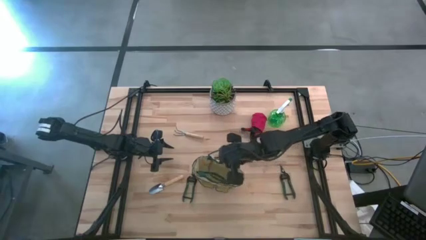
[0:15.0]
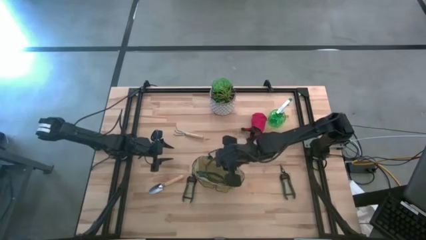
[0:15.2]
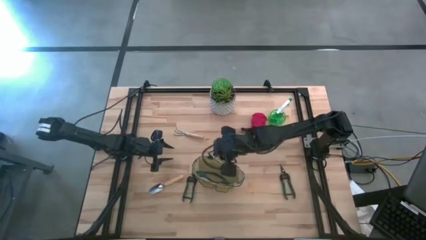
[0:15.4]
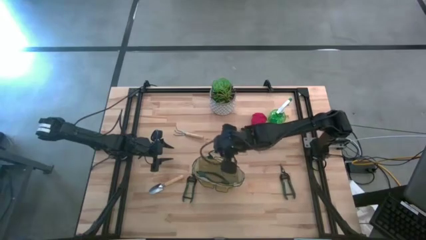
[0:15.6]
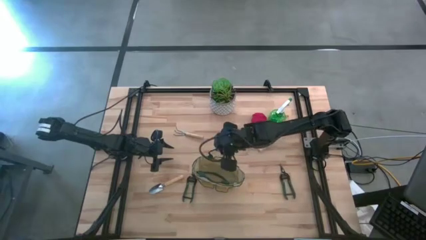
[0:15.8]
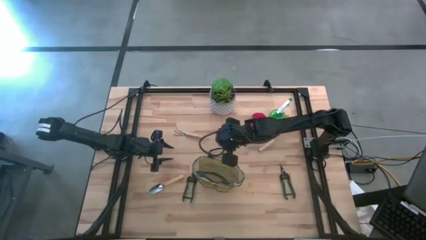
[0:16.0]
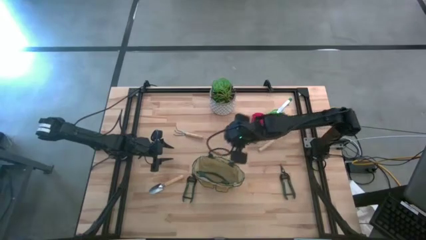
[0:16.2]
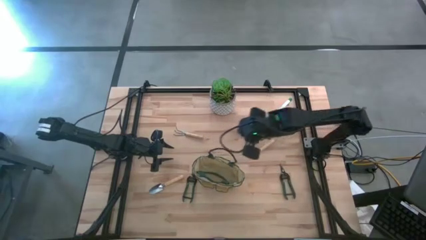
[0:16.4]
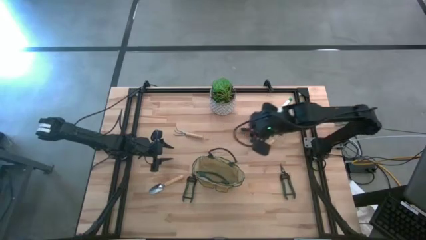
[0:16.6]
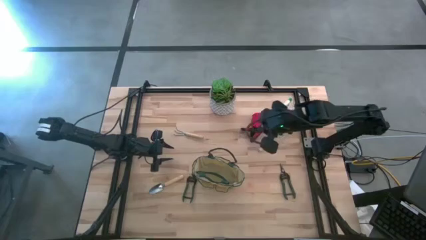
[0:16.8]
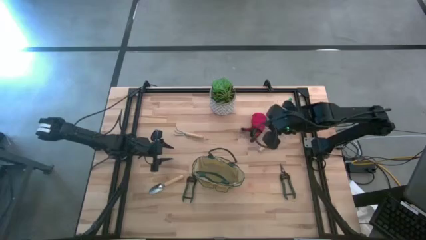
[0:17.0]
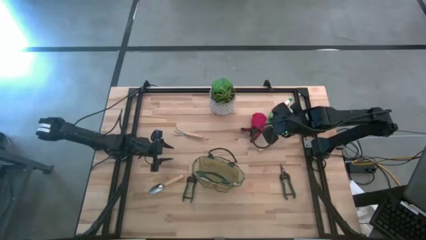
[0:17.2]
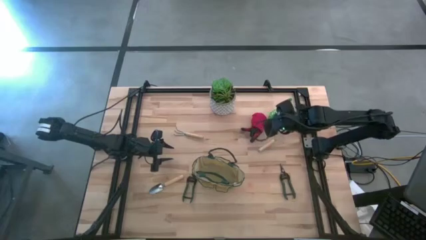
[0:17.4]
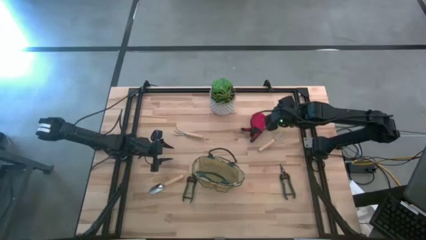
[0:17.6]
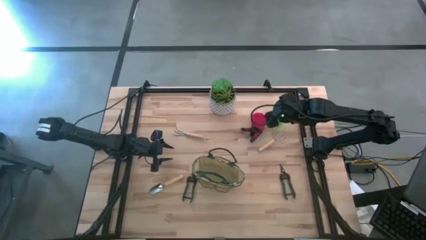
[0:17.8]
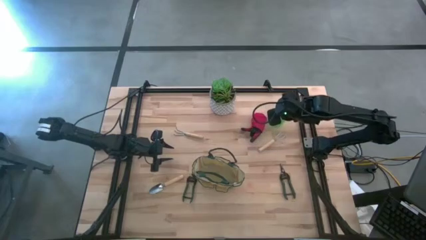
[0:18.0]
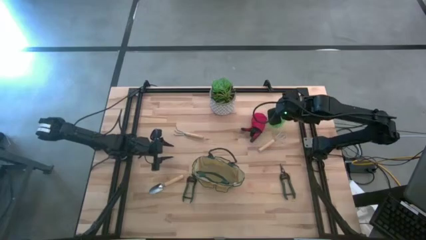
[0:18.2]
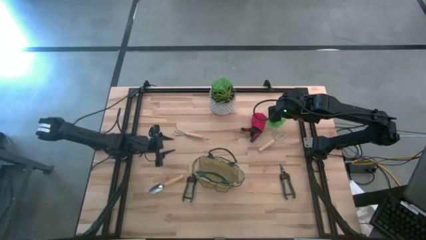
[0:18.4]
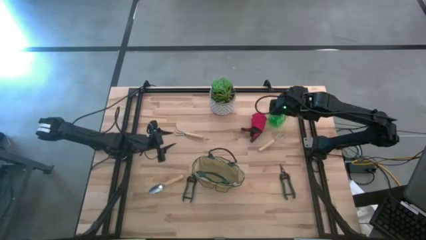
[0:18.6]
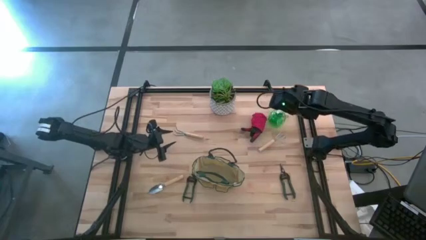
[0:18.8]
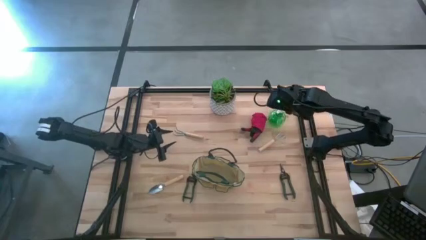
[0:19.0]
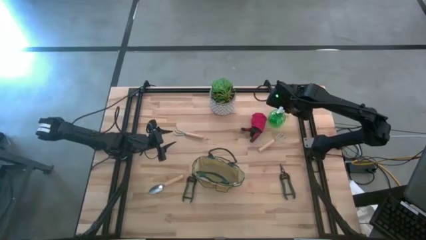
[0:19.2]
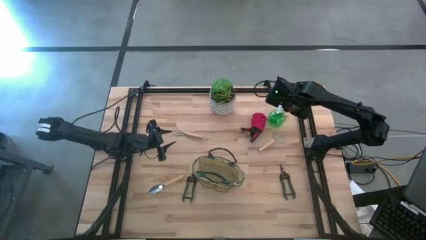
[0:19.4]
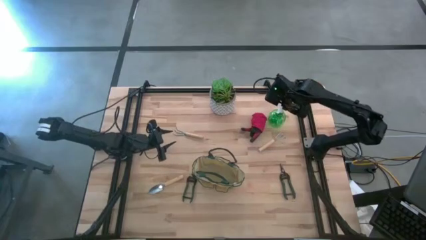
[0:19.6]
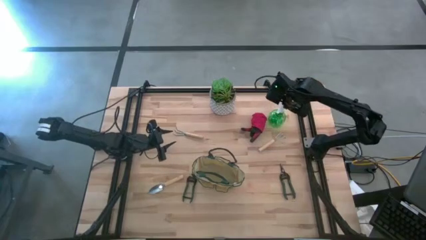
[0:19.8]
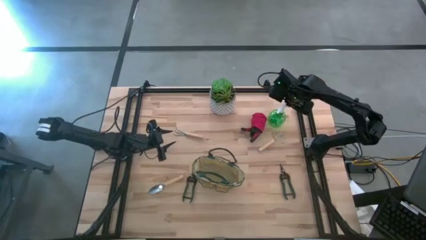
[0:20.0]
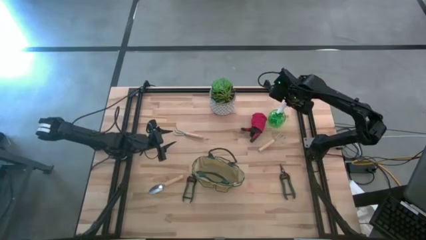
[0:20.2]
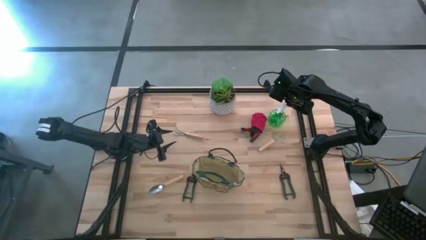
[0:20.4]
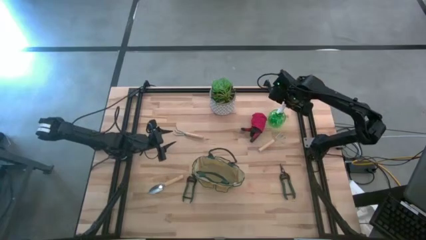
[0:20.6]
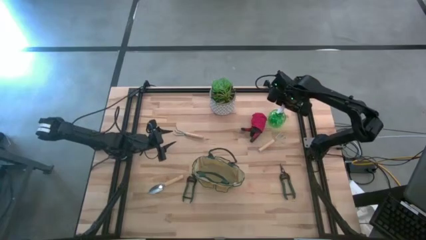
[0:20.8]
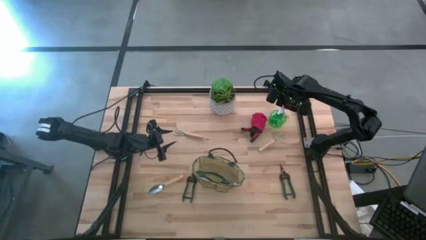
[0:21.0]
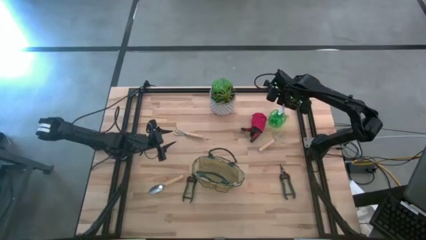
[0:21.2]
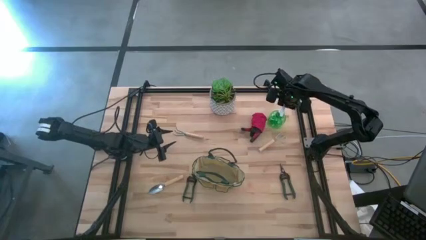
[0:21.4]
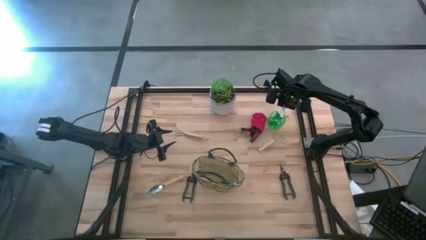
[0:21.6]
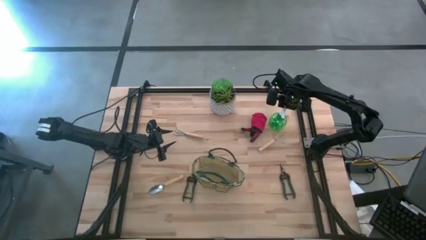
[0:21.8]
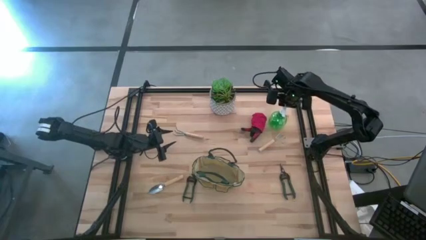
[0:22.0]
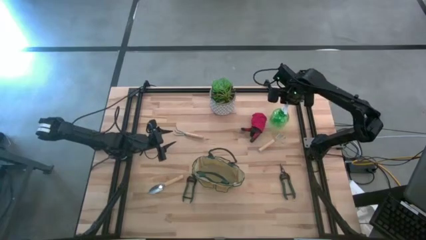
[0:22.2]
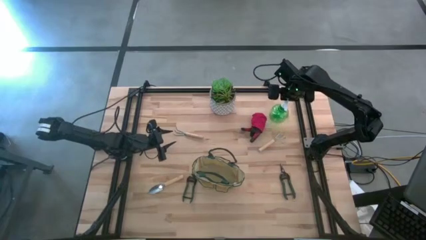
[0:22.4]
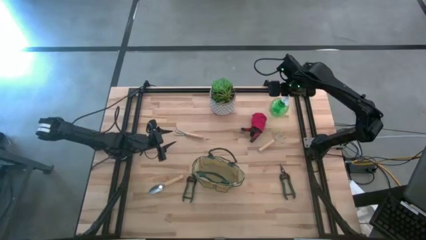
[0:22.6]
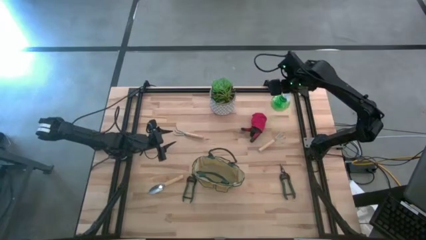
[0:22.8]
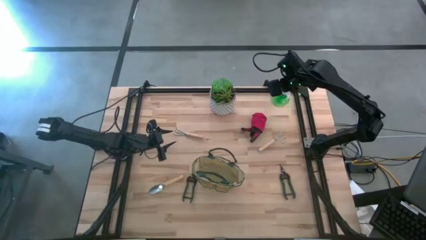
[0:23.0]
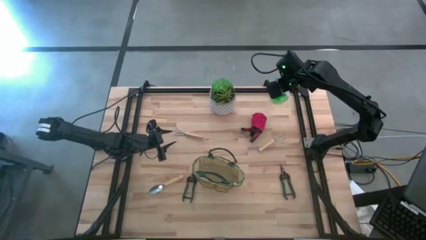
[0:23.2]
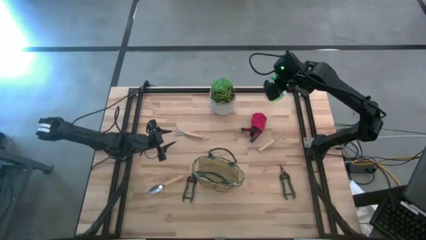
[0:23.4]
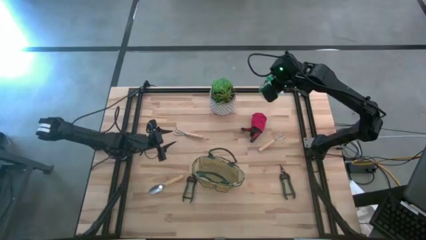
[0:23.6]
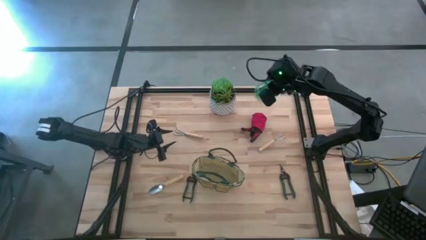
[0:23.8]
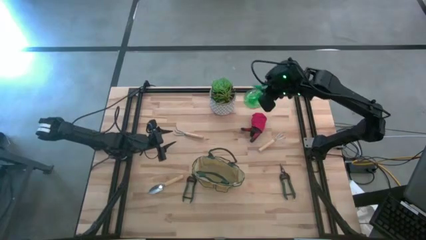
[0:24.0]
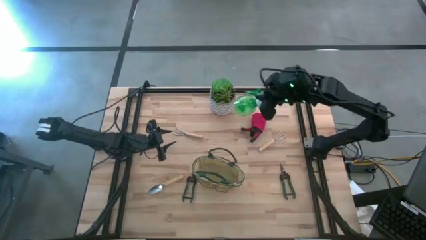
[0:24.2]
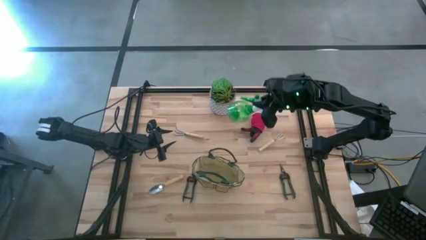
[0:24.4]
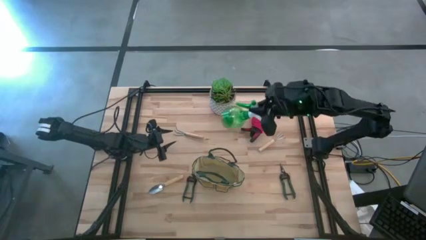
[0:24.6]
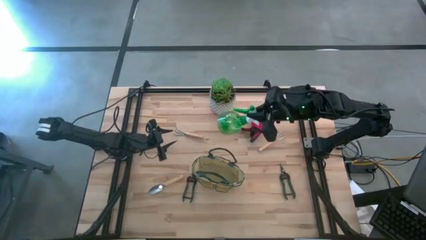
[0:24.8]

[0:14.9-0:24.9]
Task: Pick & Place Garden tools in Gardening bag
Put the green spray bottle into the white gardening bag

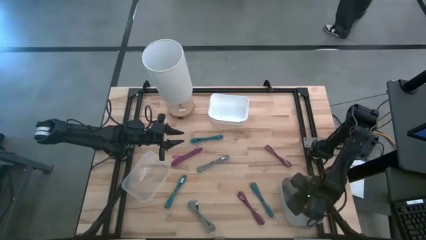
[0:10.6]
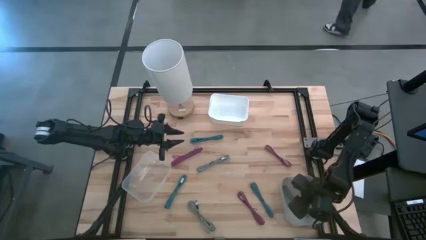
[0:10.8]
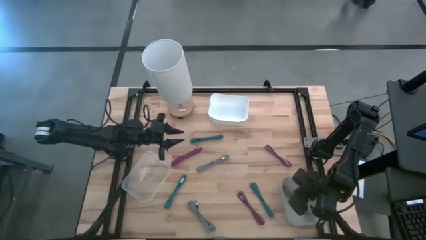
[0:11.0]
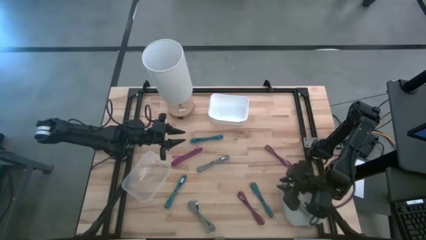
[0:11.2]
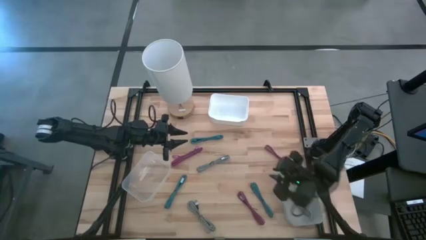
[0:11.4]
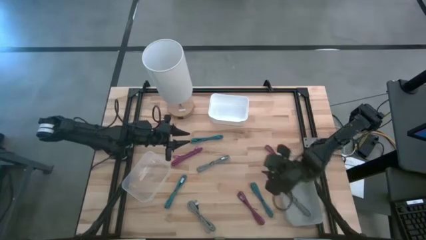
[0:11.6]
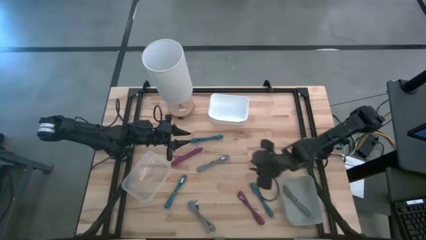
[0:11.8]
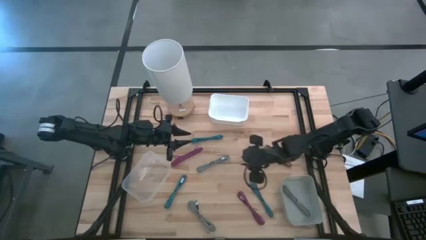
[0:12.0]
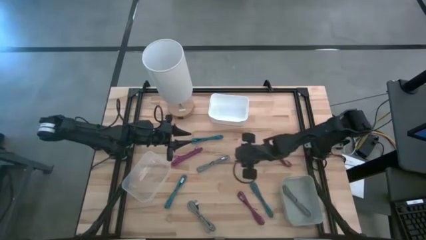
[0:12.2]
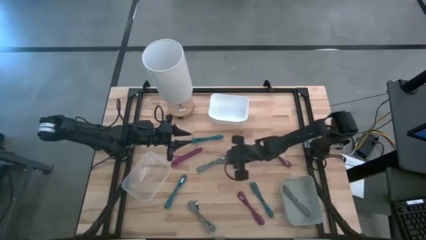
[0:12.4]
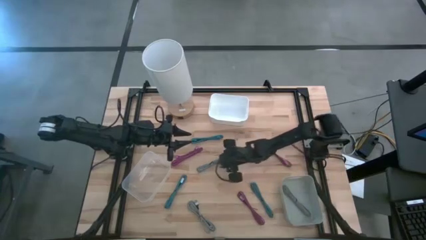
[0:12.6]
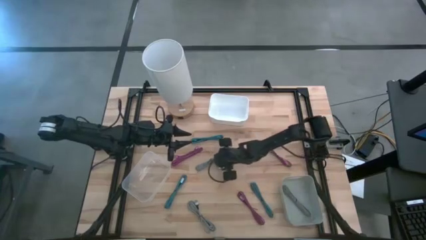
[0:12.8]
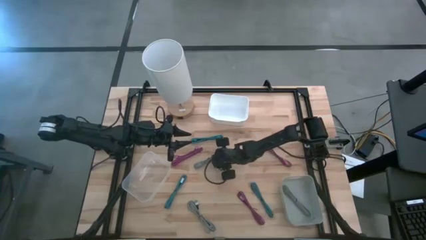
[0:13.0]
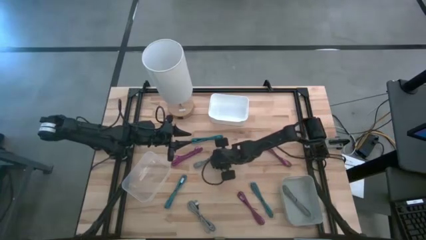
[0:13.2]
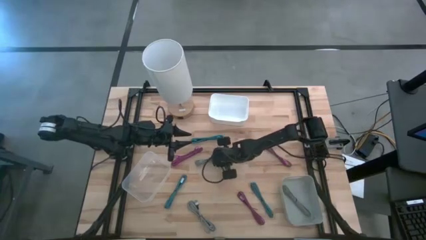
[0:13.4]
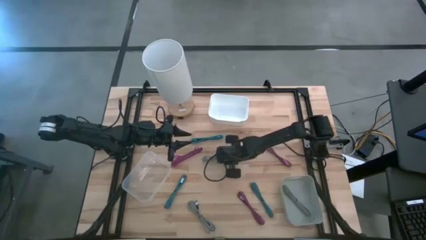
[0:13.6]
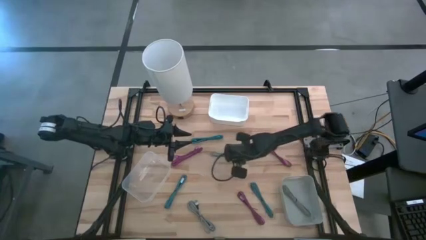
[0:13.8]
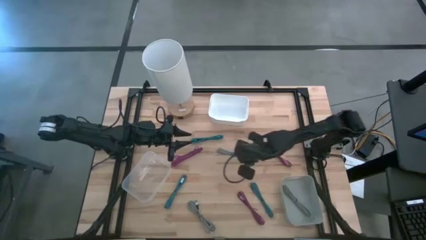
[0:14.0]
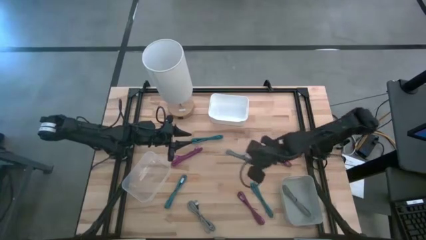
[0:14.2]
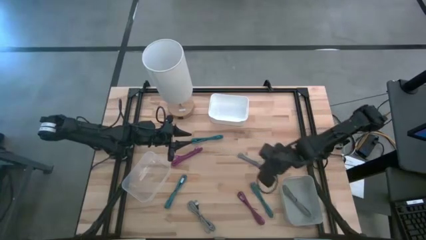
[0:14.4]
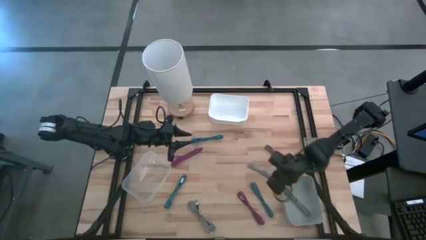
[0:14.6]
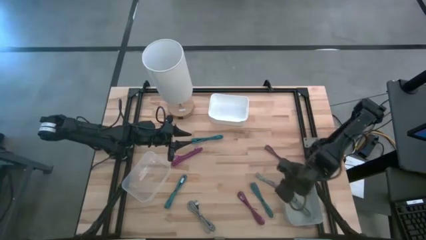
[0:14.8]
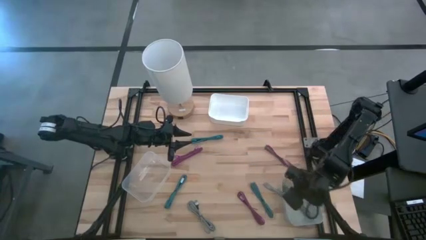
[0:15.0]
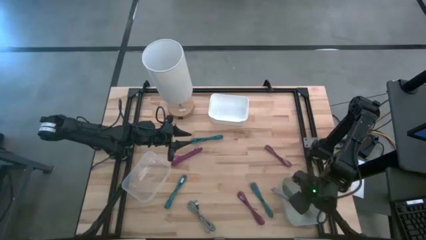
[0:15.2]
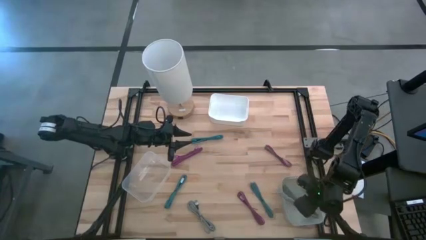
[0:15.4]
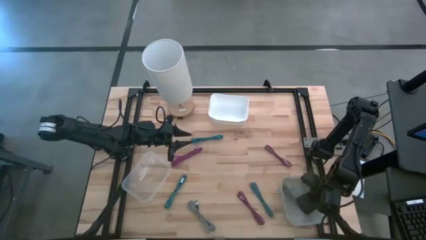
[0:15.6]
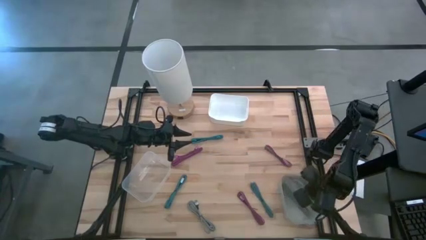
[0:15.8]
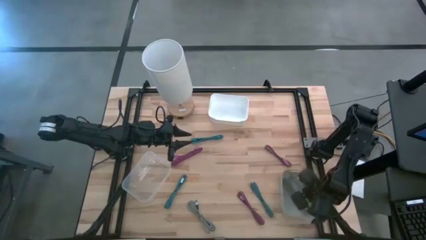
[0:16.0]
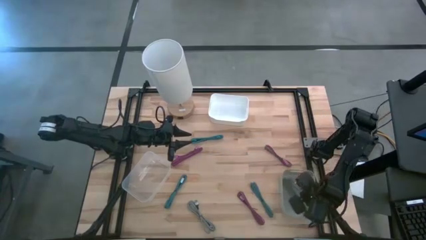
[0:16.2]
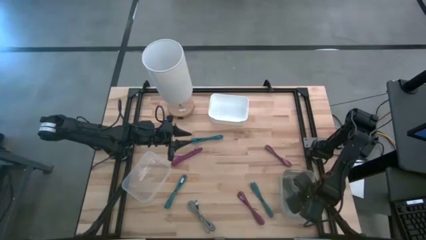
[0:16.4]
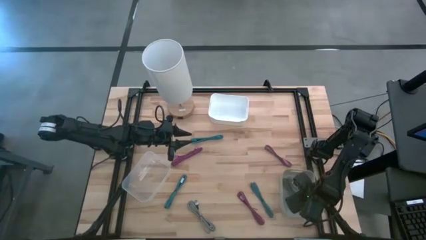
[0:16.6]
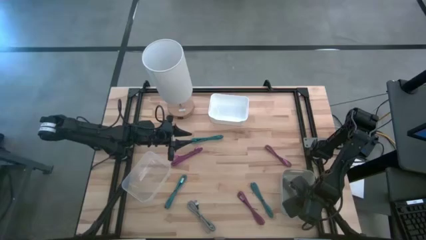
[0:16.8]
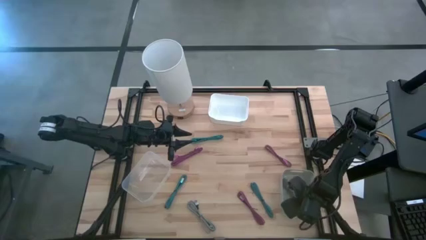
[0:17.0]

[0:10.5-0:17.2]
Task: Pick & Place USB Port
Put the top white charger cable into the gray bin
